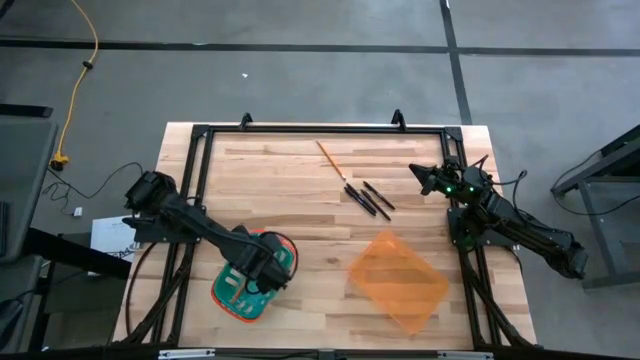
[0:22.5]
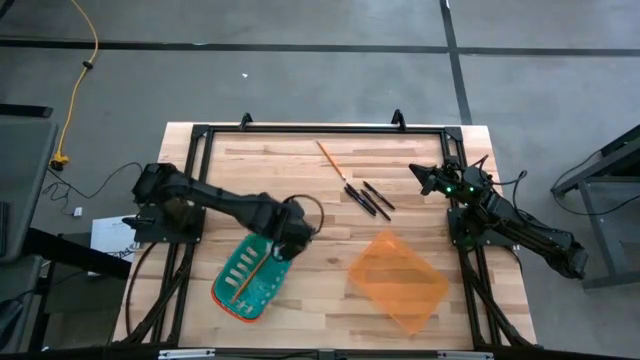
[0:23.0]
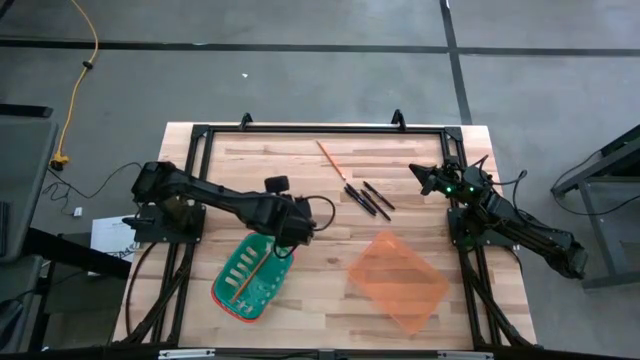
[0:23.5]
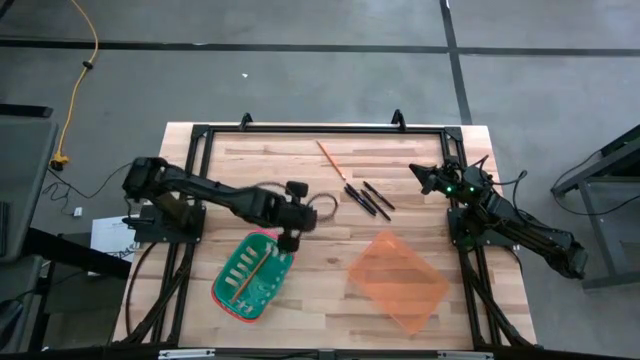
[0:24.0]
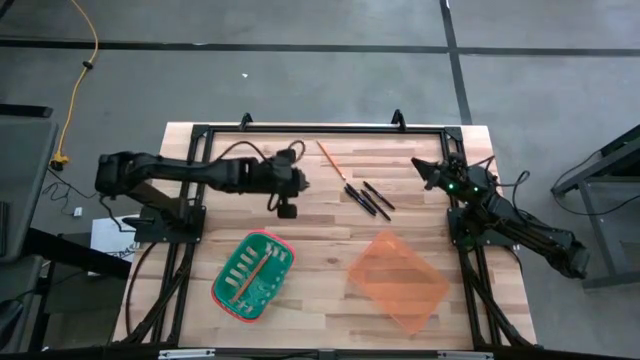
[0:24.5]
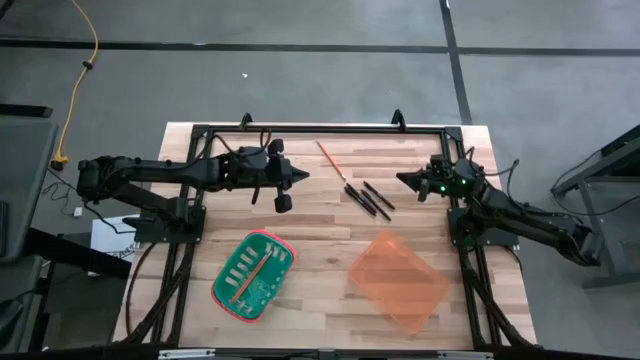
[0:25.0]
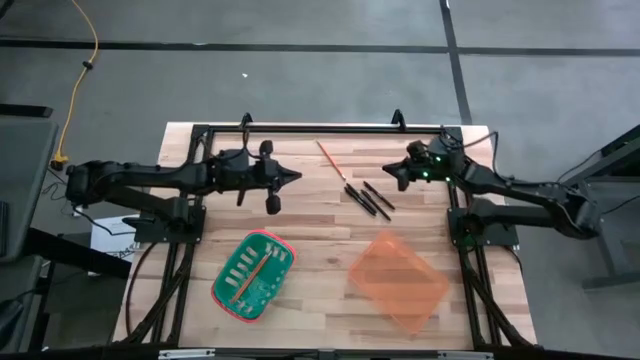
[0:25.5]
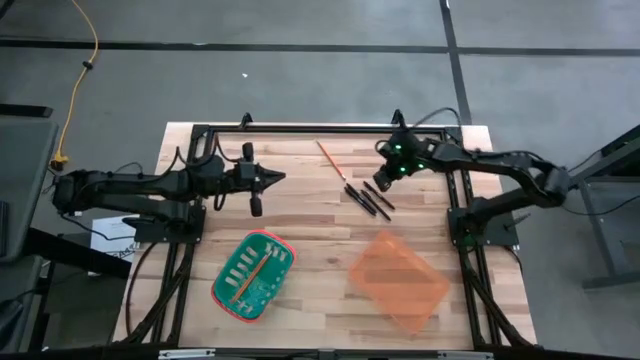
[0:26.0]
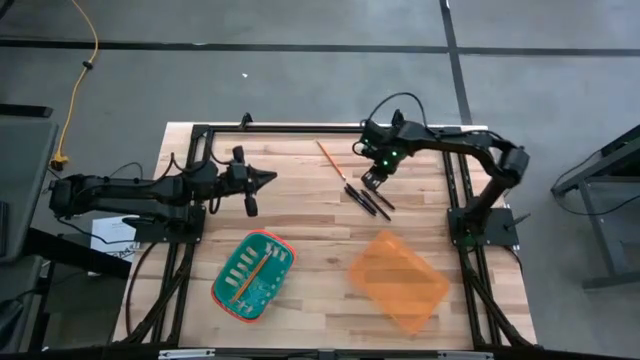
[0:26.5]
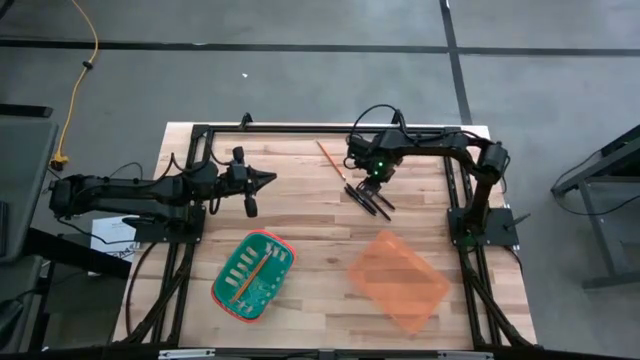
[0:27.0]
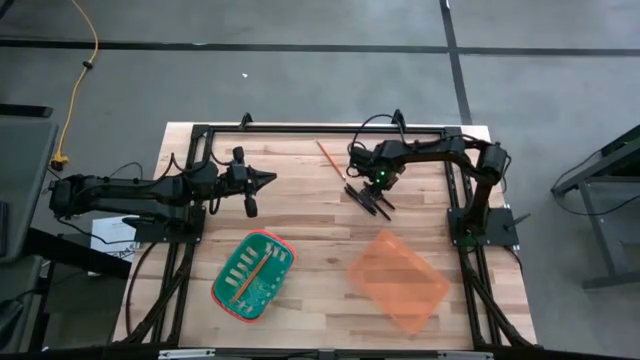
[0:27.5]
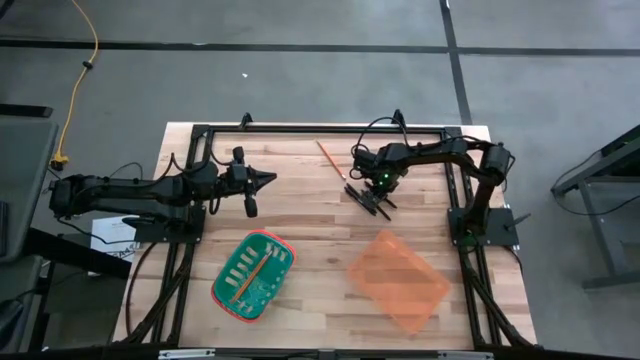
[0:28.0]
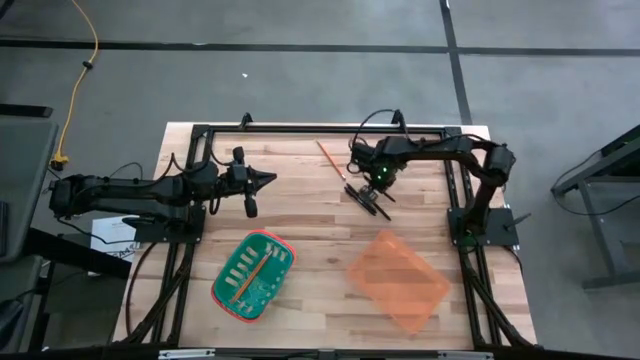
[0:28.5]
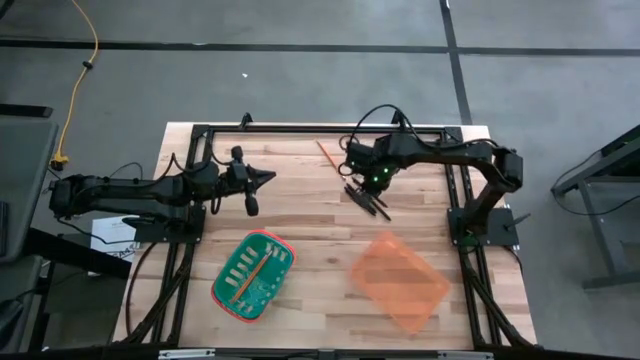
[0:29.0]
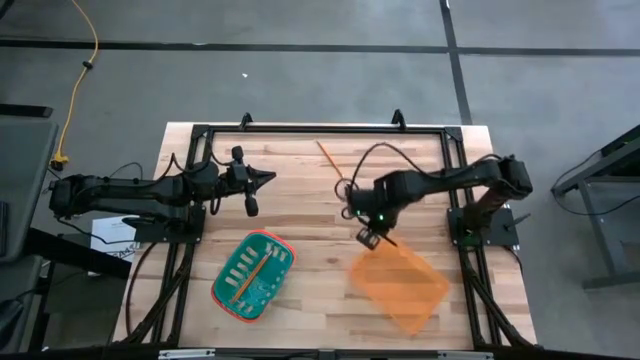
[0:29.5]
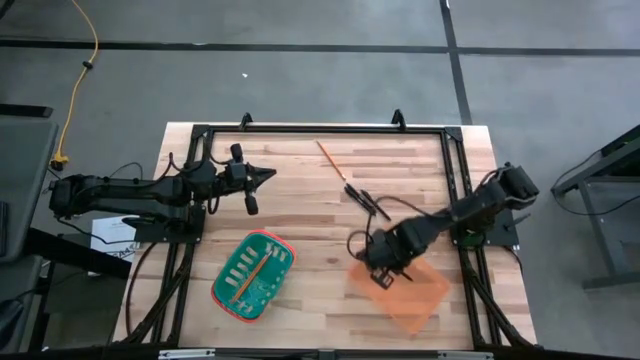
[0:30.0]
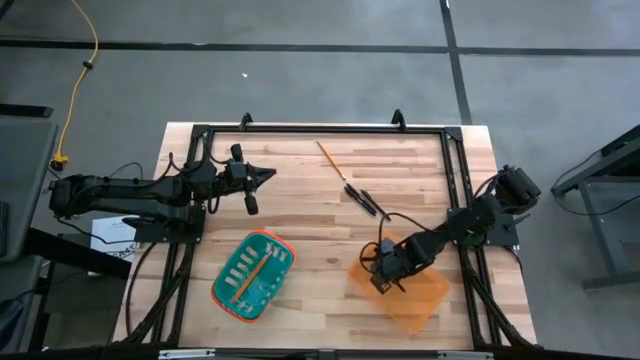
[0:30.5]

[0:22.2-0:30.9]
Task: Sort pens & pencils
Put the black pen into the orange bin

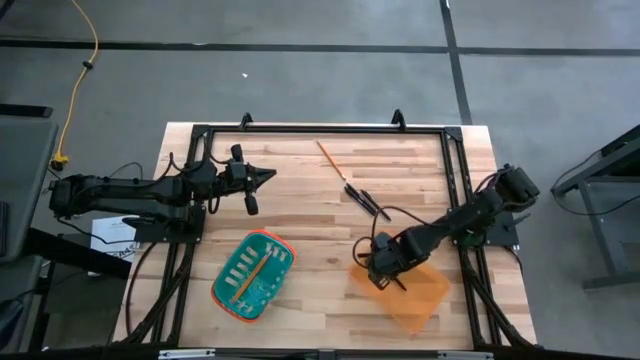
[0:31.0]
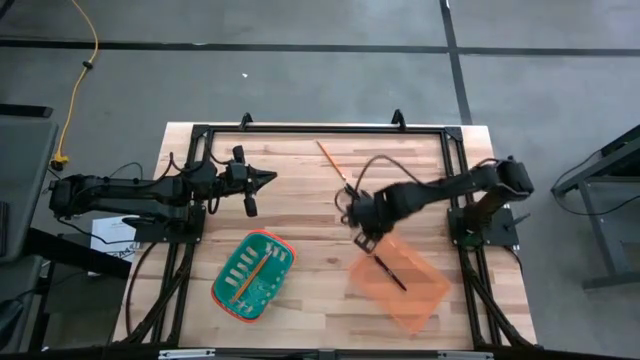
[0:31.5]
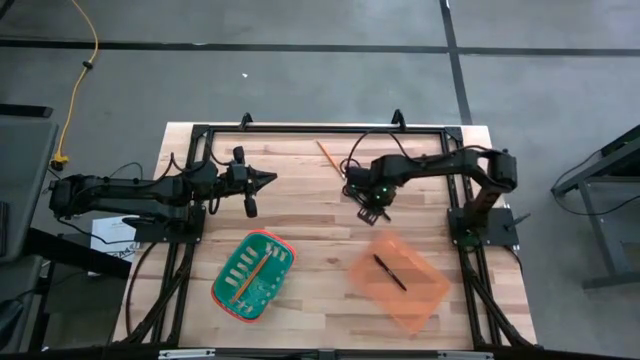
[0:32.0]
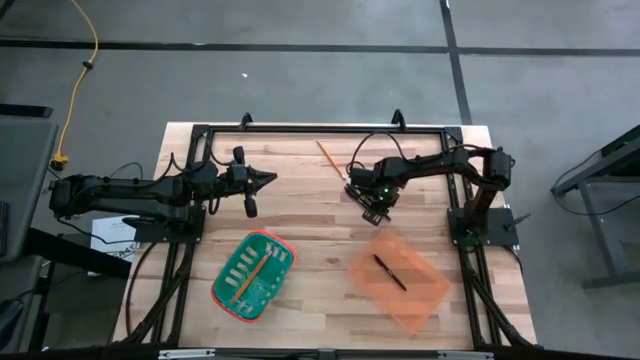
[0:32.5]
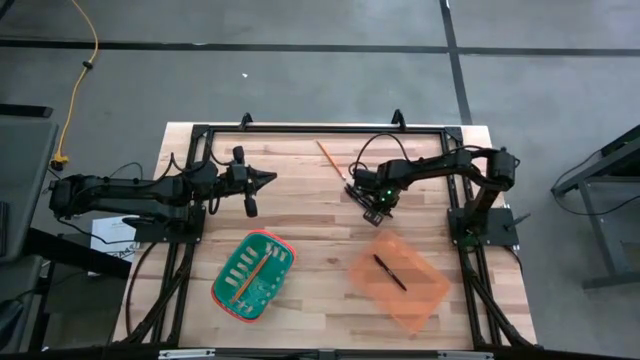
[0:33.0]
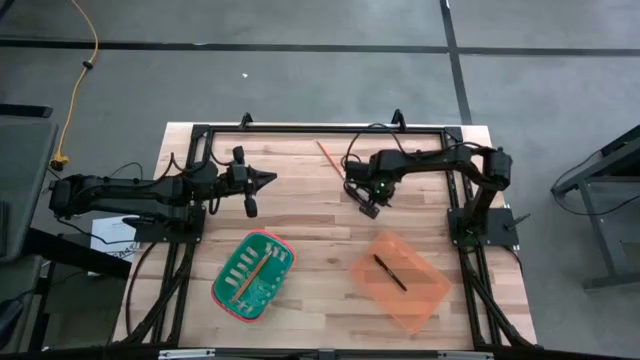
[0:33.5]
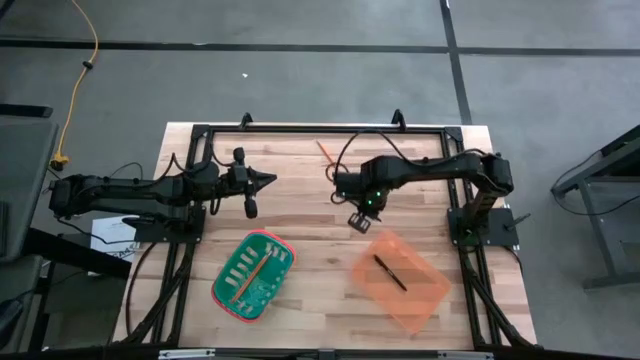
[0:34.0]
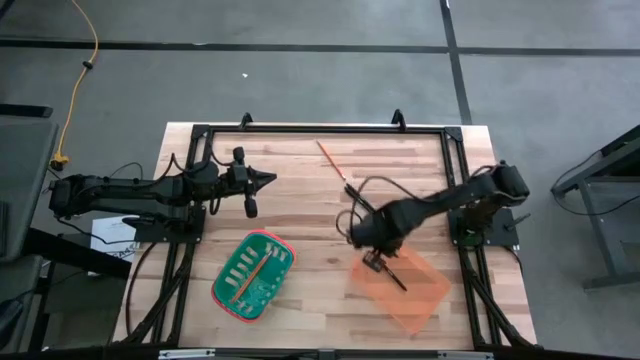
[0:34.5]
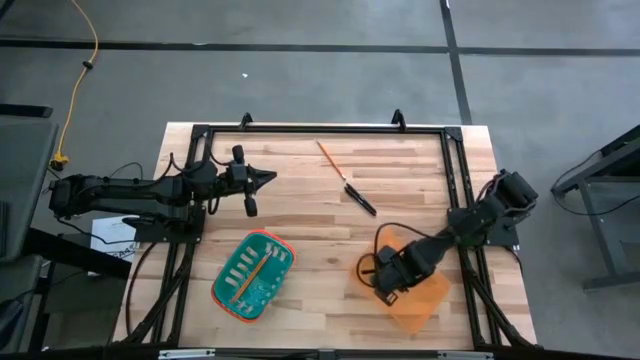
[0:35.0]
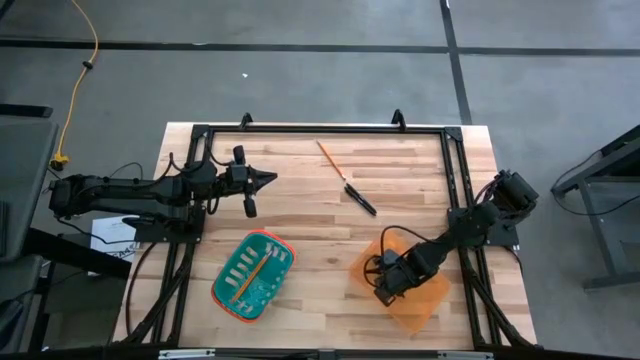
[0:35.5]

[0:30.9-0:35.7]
Put the black pen into the orange bin

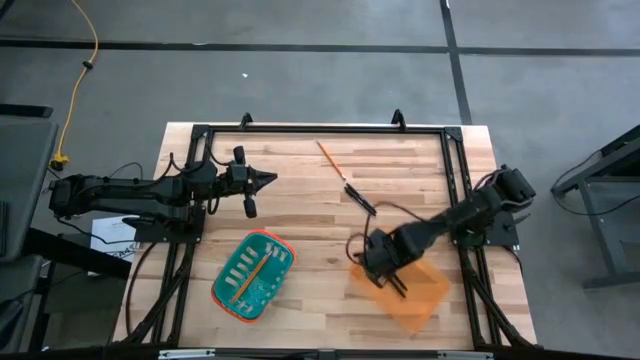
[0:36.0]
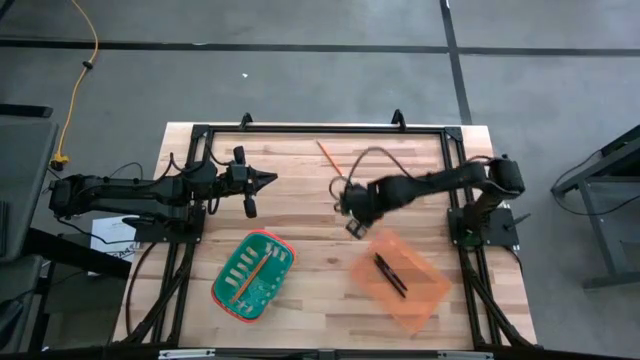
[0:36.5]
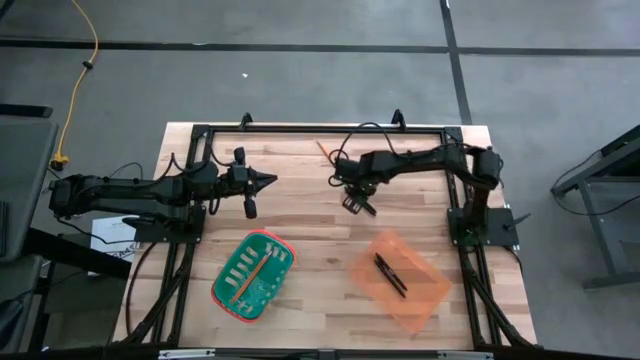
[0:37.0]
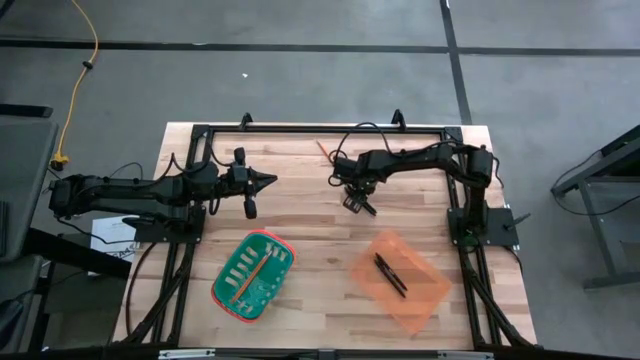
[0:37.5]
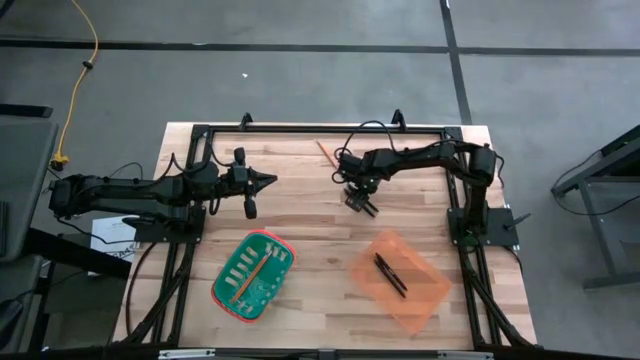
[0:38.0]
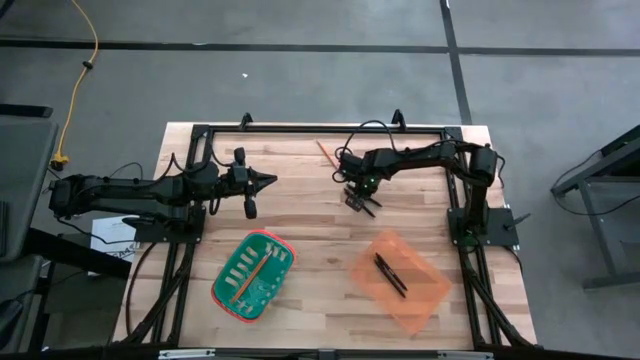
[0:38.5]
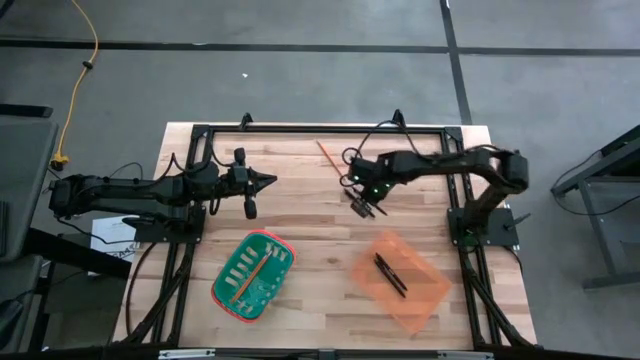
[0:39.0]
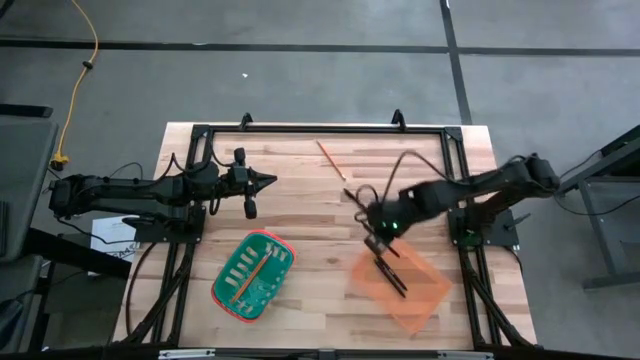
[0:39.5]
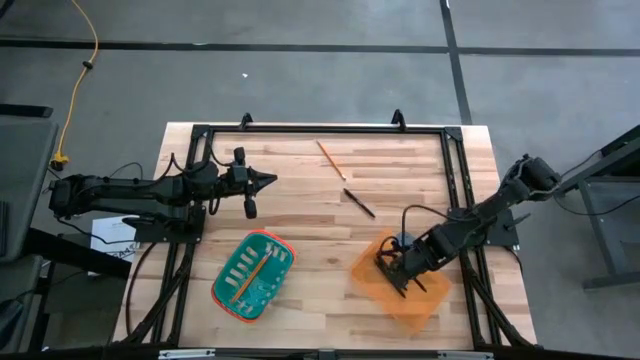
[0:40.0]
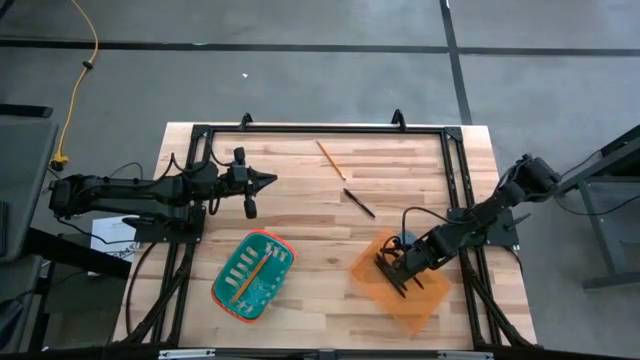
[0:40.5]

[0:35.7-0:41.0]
Put the black pen into the orange bin

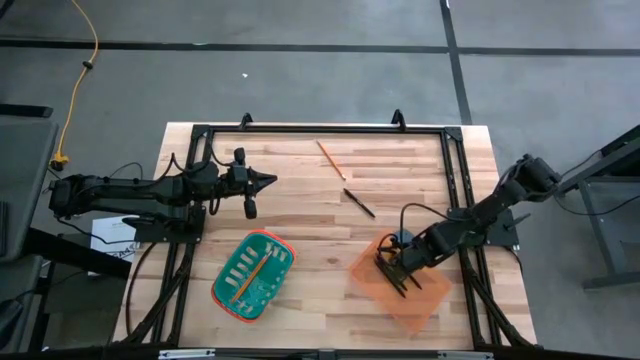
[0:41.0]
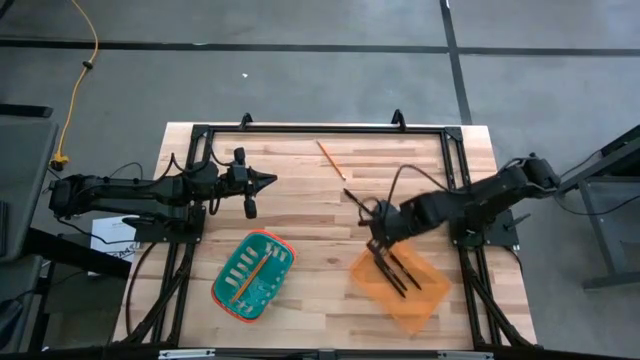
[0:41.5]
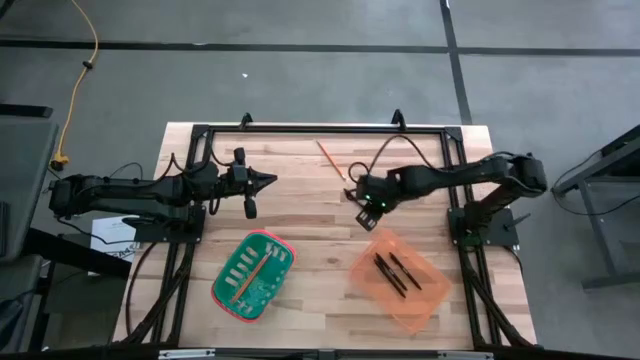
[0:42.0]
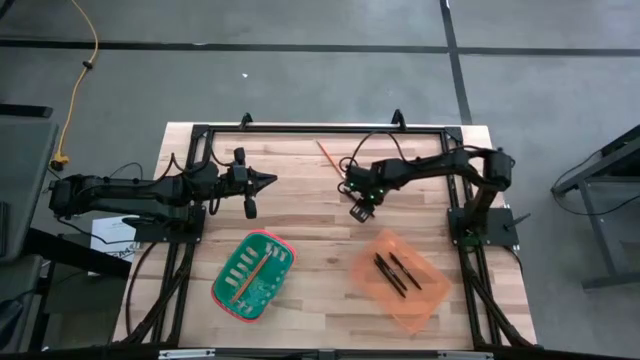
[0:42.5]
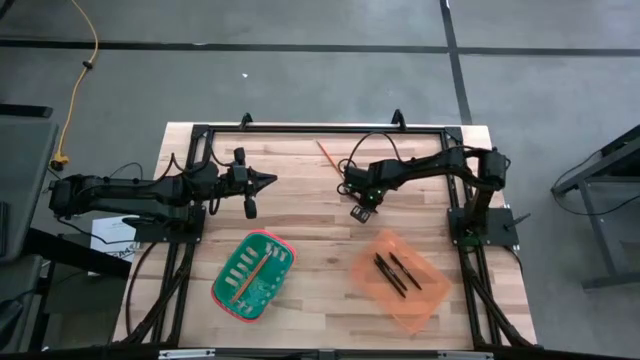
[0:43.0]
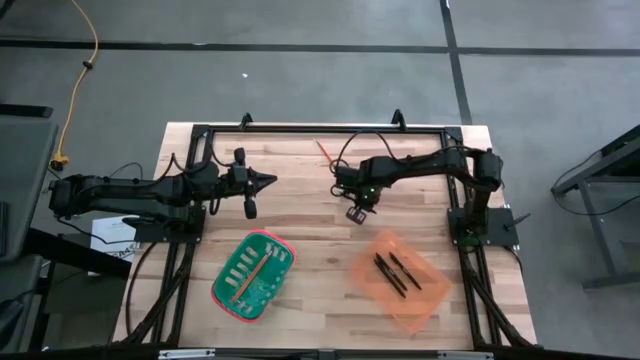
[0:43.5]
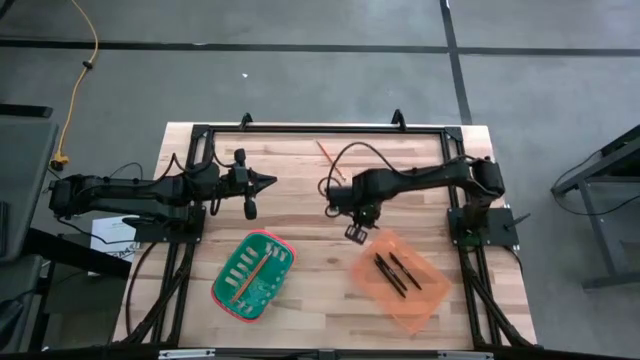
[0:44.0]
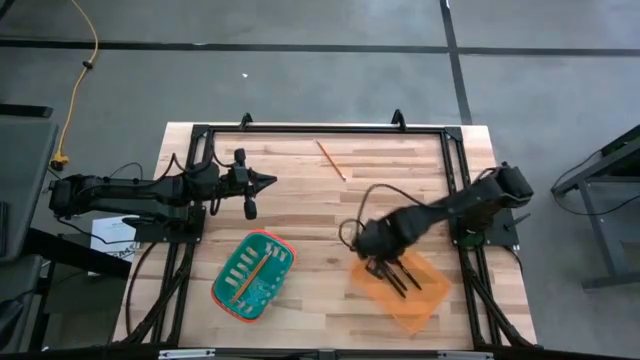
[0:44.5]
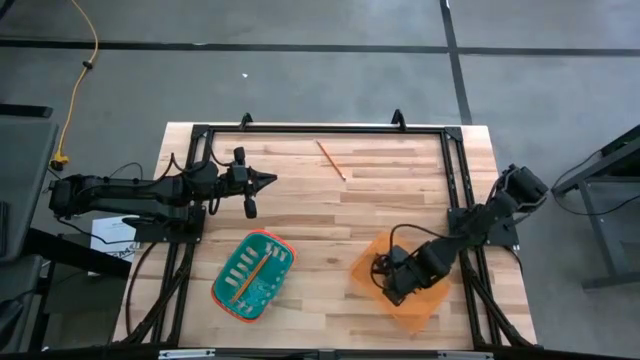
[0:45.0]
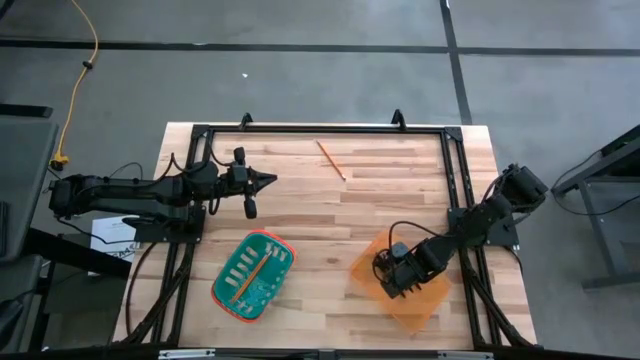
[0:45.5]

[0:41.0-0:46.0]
Put the black pen into the orange bin
